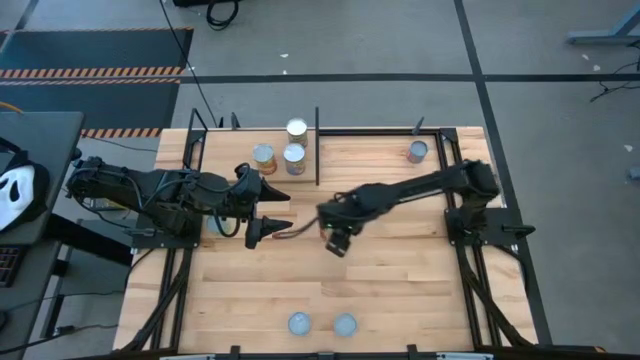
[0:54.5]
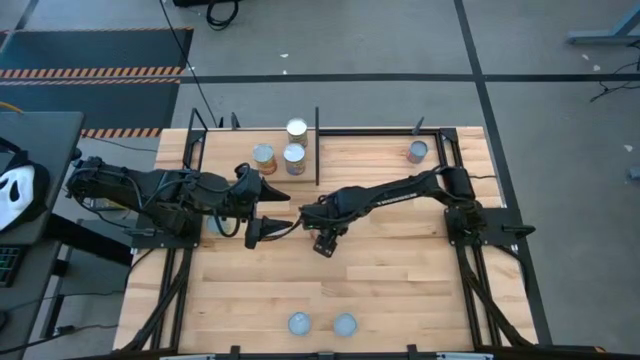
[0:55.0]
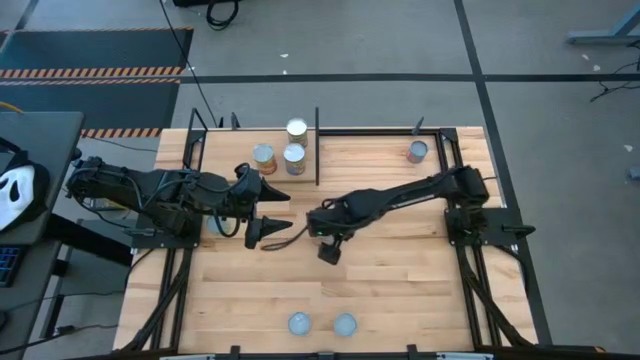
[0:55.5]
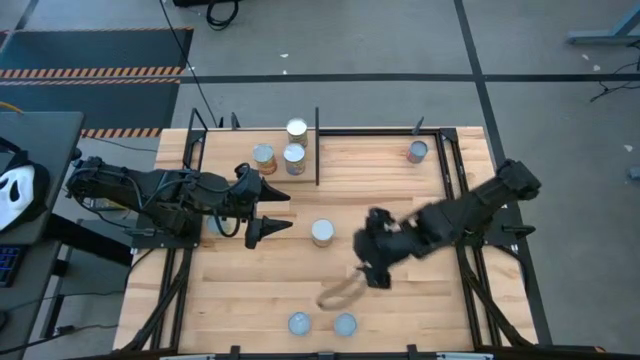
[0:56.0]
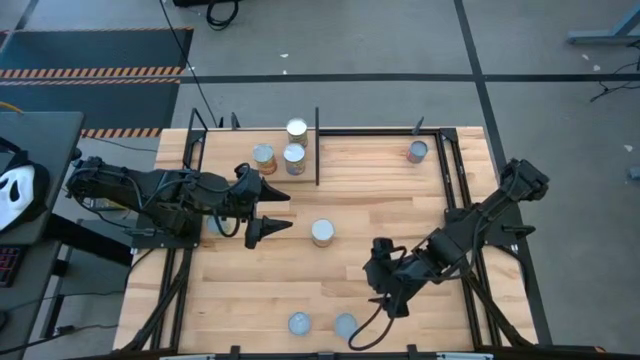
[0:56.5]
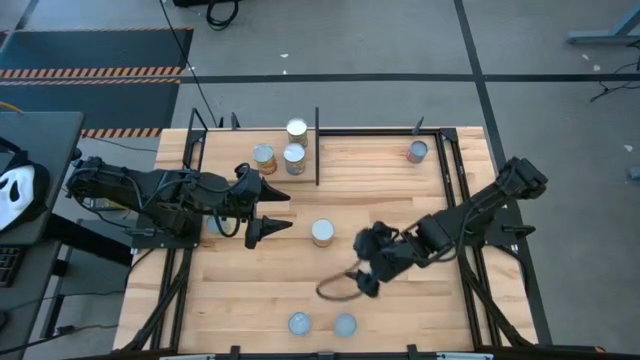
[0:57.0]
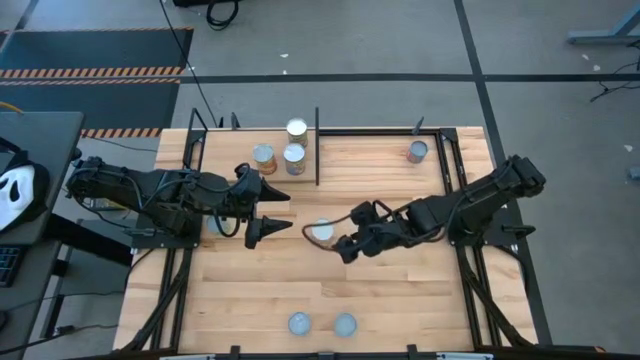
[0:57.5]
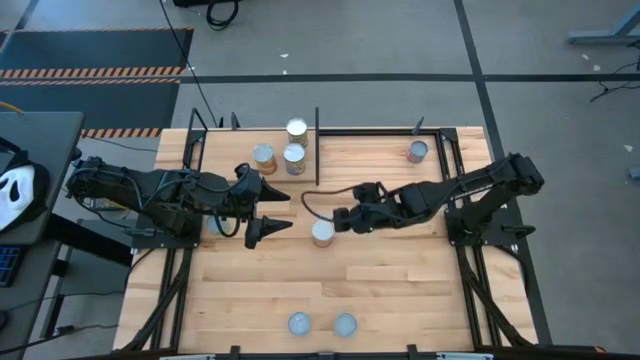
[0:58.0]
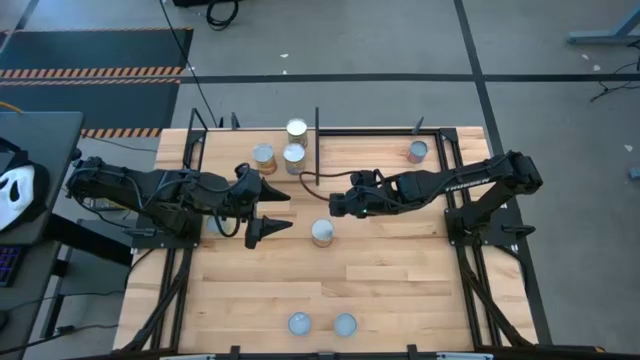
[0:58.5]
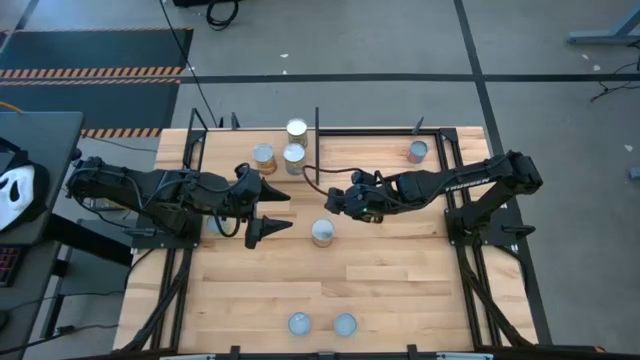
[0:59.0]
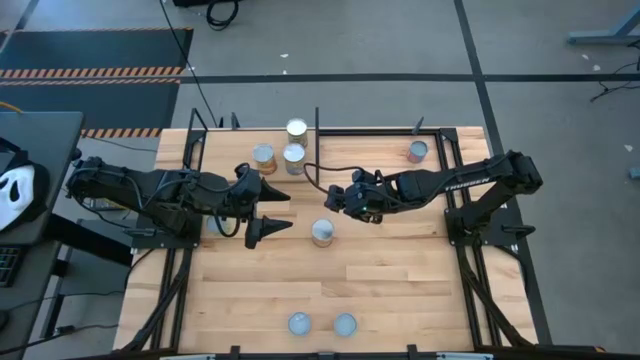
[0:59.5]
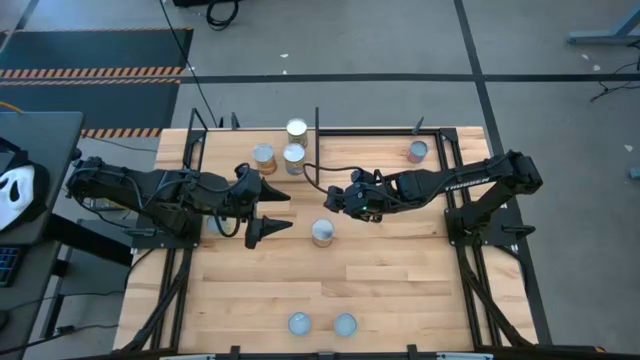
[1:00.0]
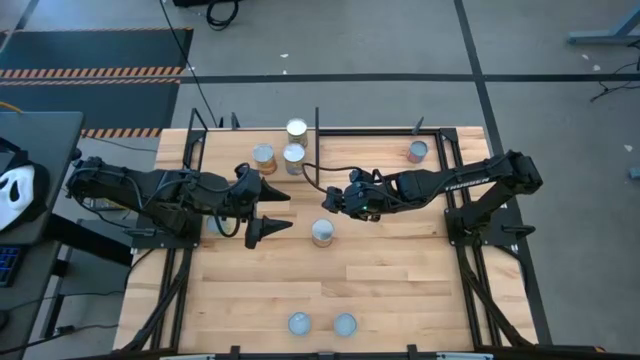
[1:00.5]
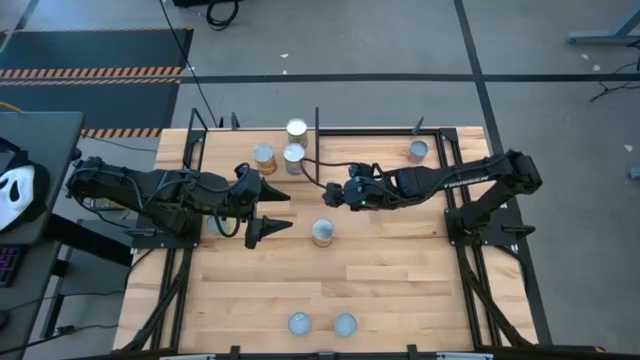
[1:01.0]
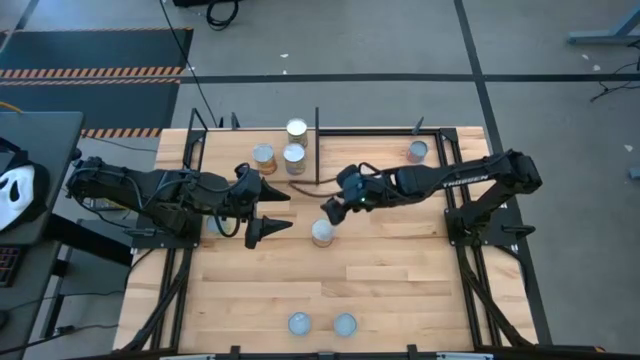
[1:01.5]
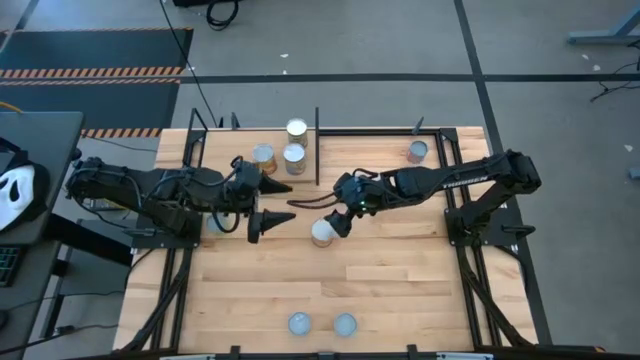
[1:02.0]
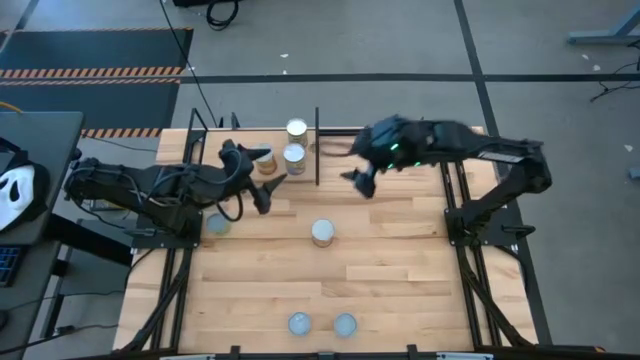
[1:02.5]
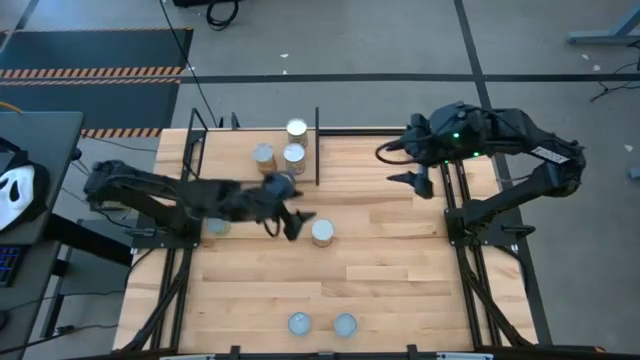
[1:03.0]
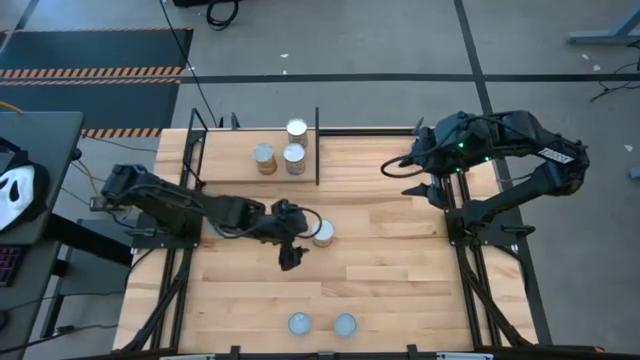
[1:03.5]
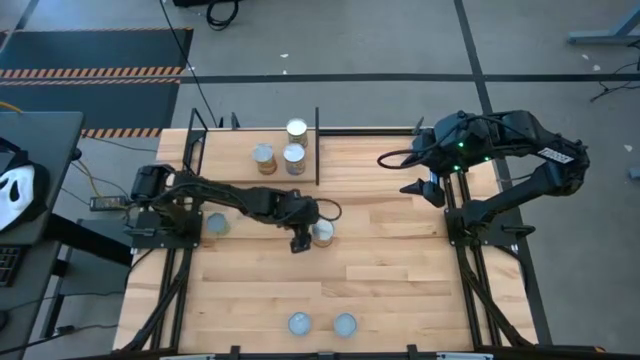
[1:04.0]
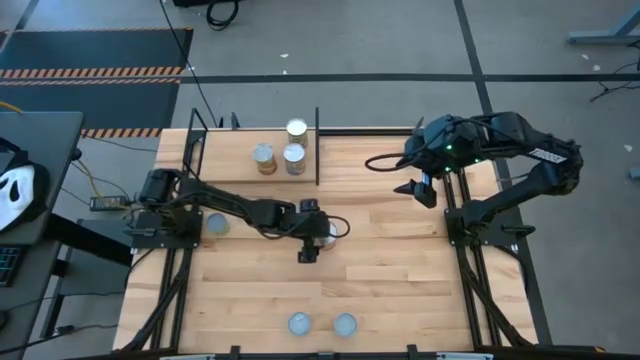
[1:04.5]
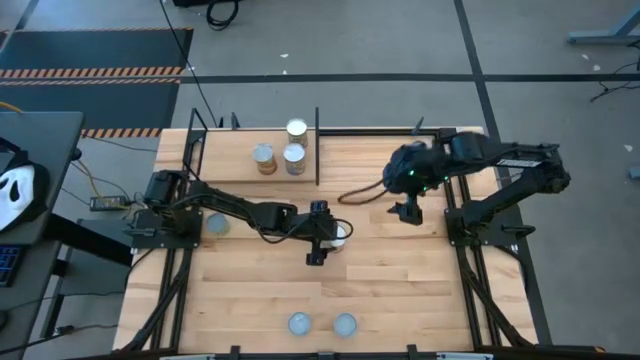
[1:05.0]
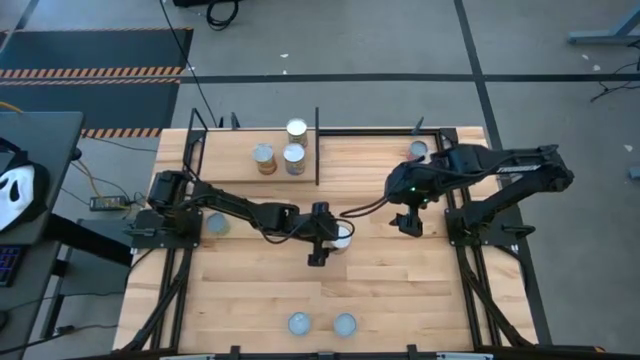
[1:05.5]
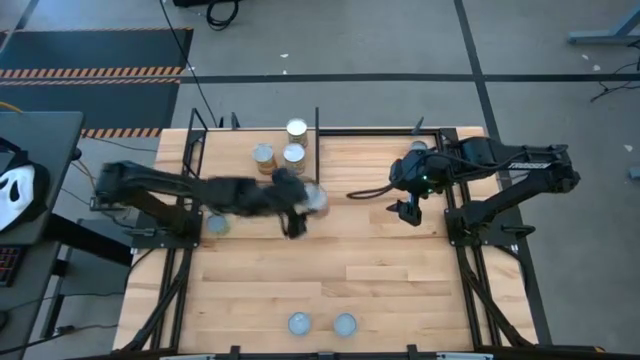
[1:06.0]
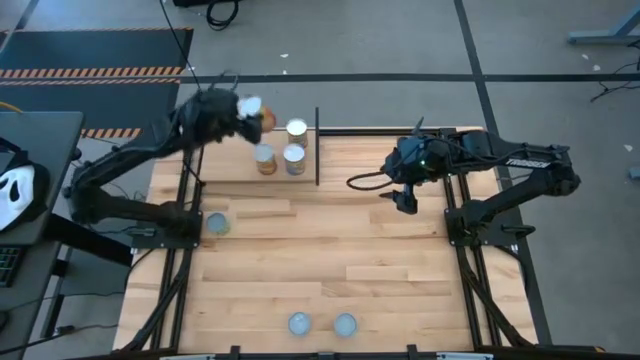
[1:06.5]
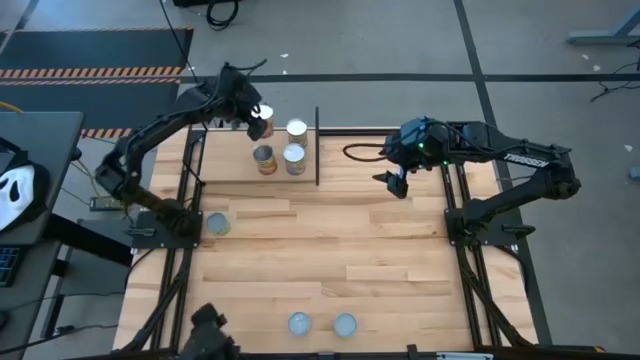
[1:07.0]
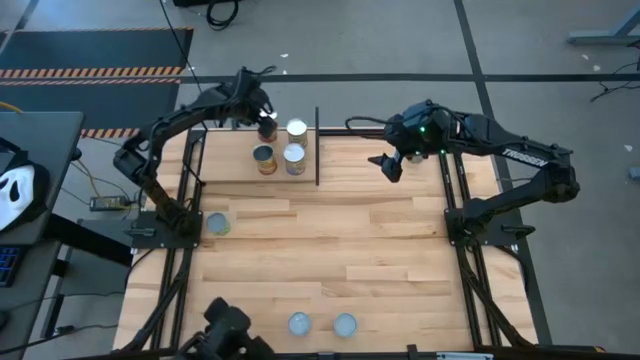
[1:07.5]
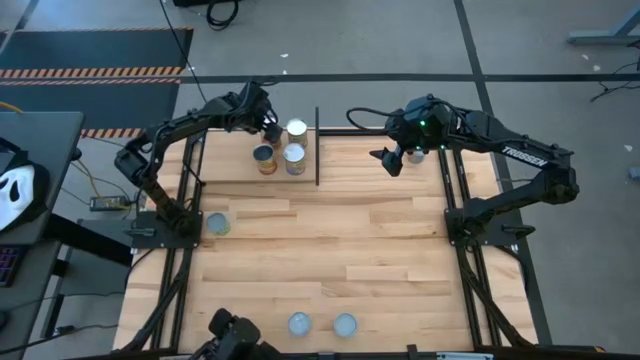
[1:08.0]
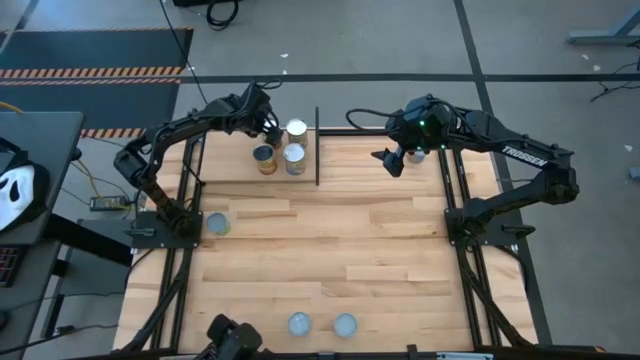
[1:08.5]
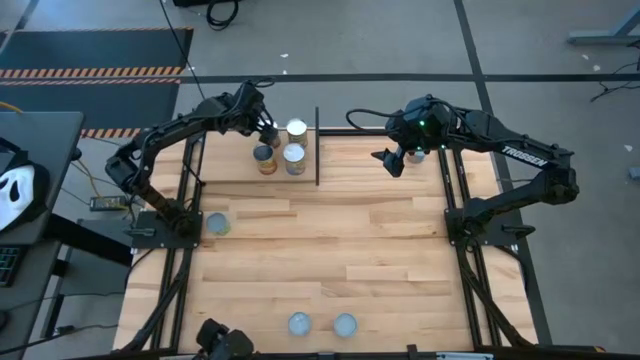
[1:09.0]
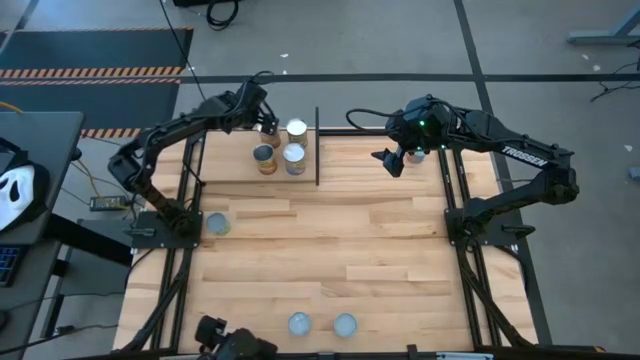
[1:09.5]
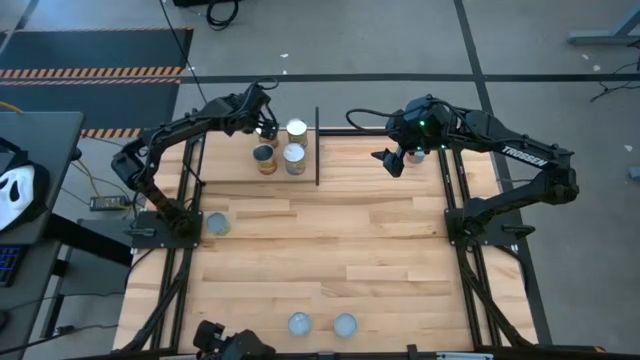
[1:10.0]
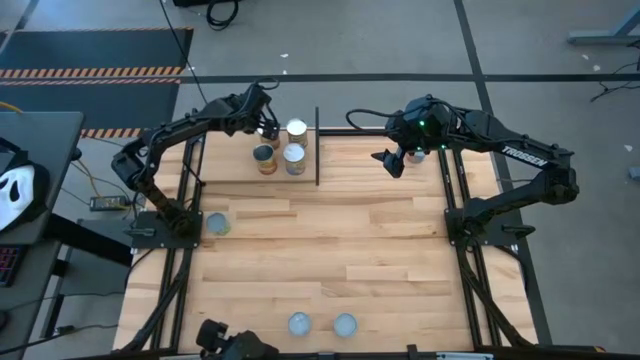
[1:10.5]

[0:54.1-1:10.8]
Task: Pick and place cans onto a shelf
Put the can of corn on the shelf

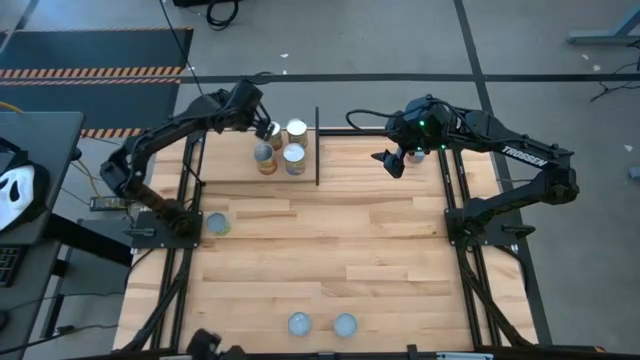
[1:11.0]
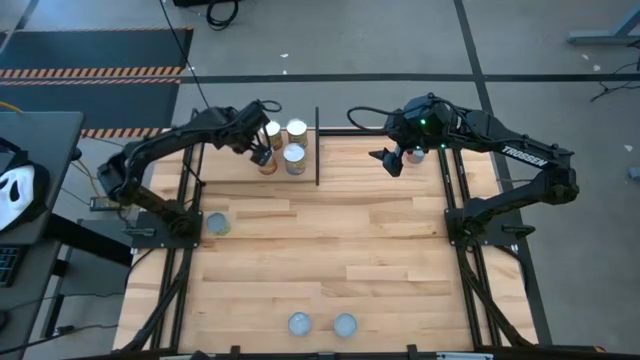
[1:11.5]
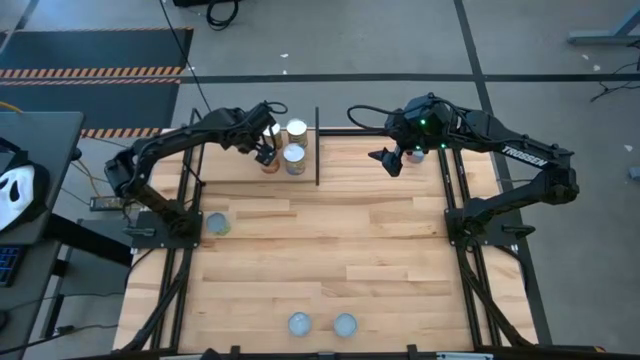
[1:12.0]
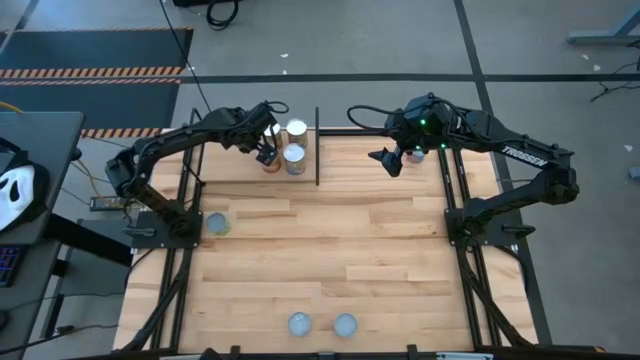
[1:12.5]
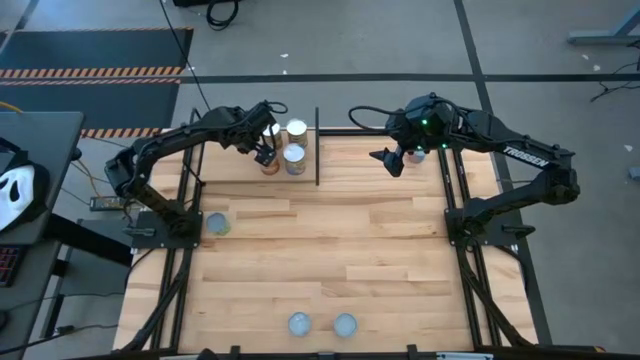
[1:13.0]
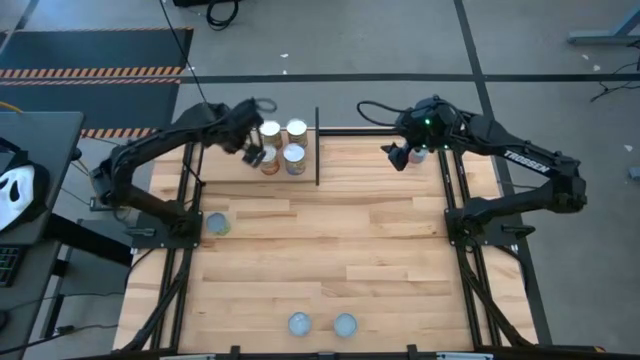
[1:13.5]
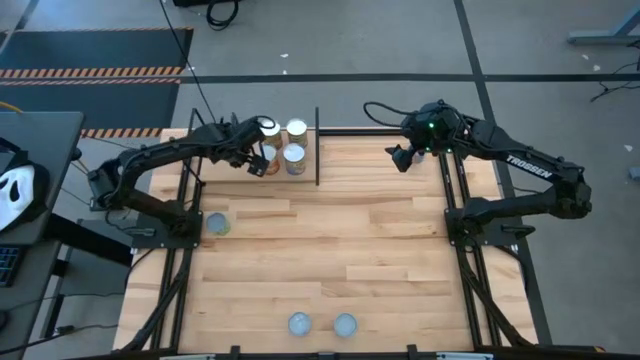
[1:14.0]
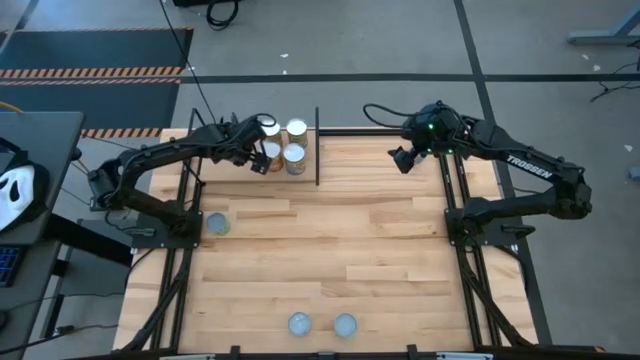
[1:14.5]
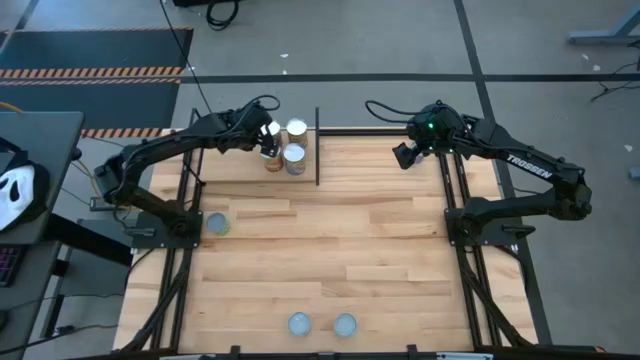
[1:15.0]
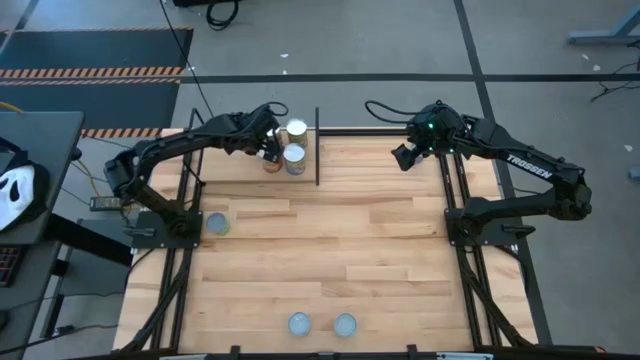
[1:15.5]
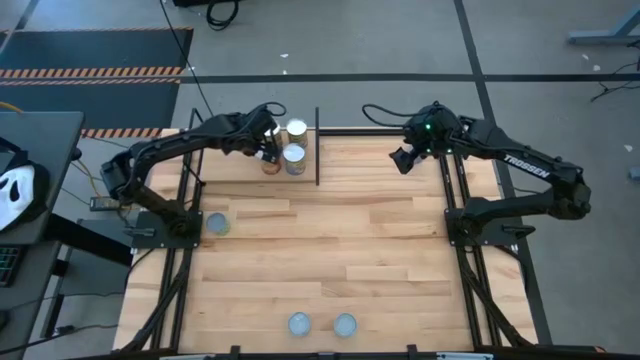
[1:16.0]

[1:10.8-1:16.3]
Adjust the canned corn on the shelf
